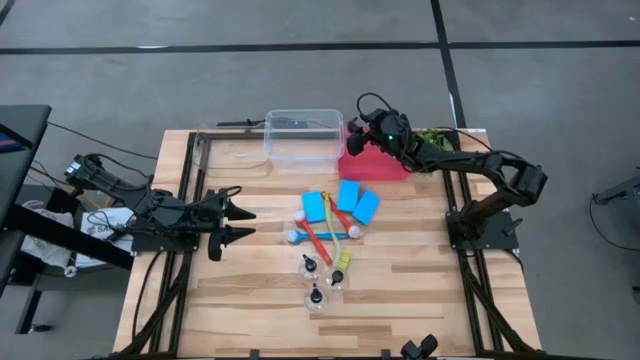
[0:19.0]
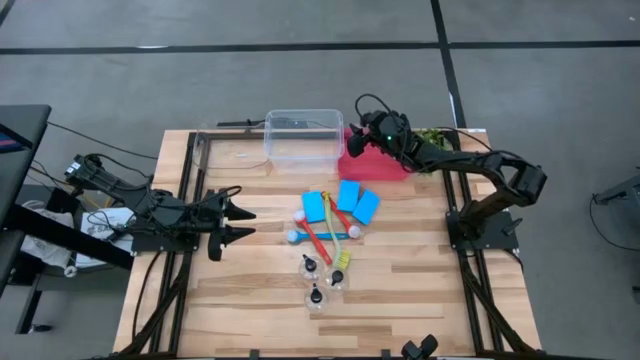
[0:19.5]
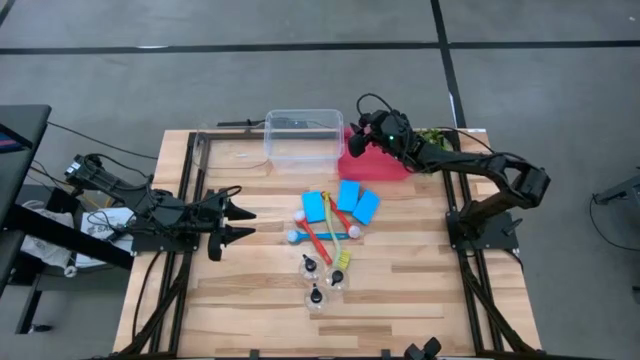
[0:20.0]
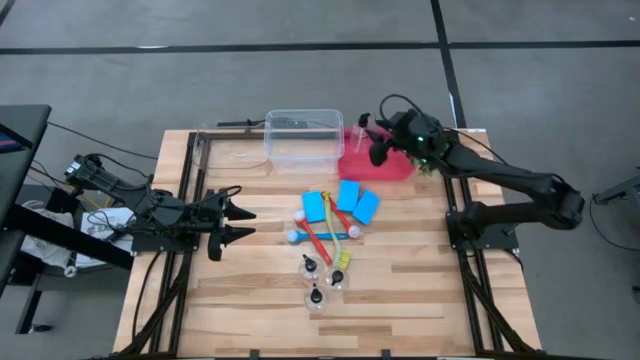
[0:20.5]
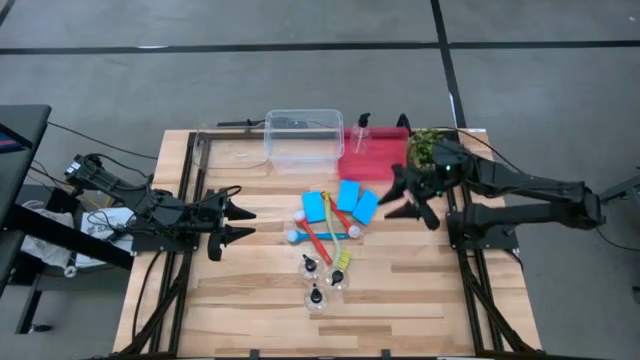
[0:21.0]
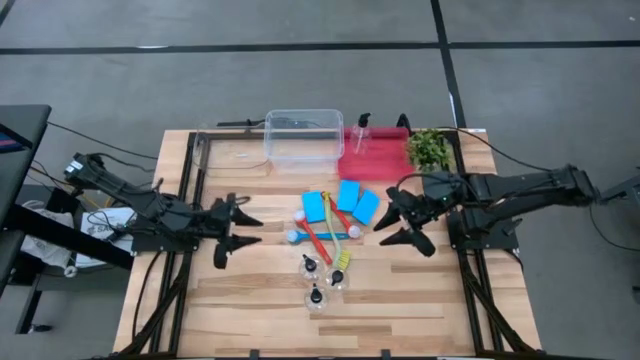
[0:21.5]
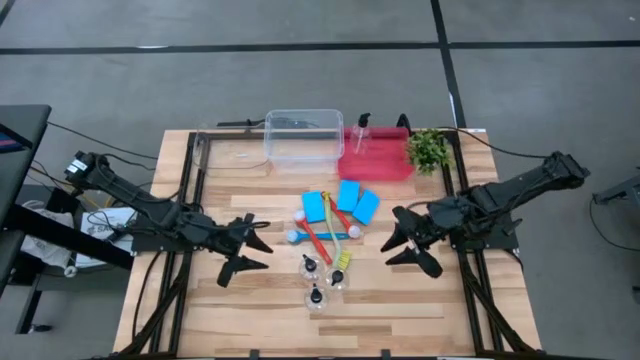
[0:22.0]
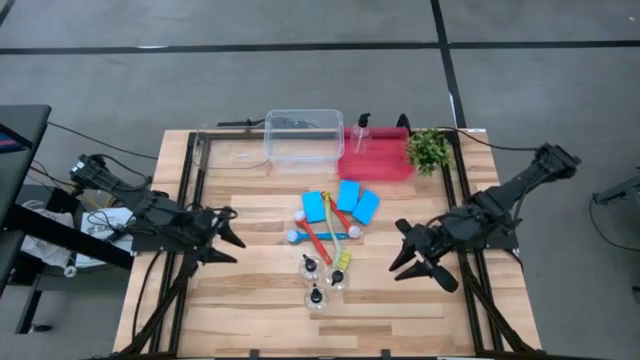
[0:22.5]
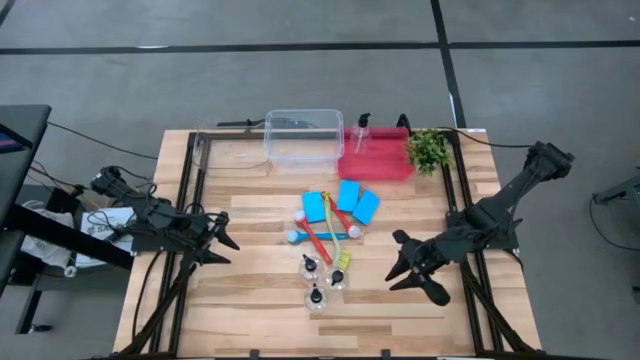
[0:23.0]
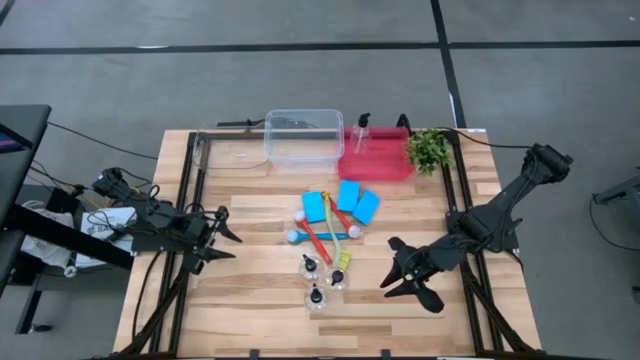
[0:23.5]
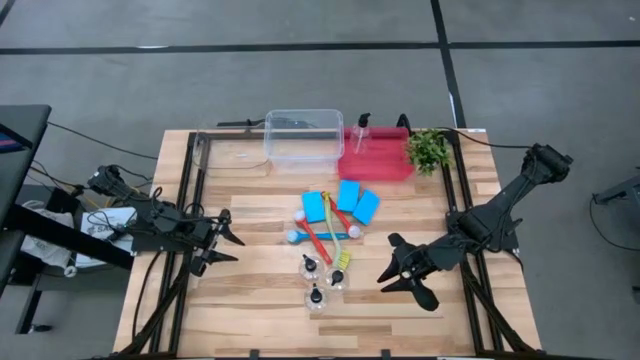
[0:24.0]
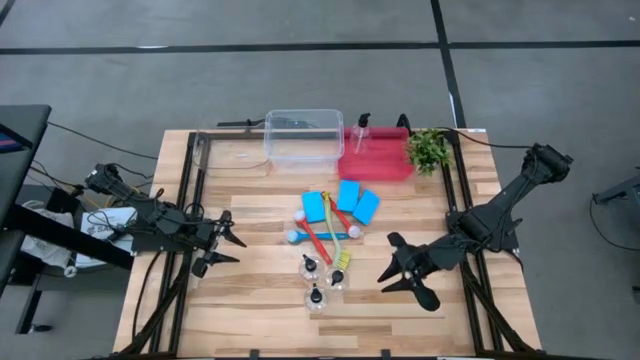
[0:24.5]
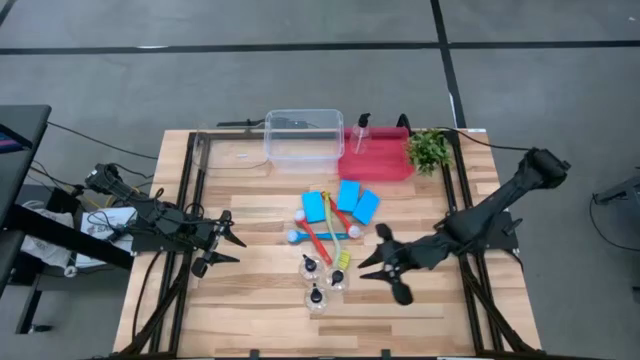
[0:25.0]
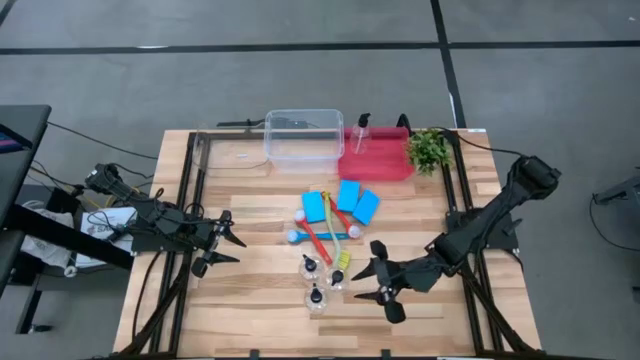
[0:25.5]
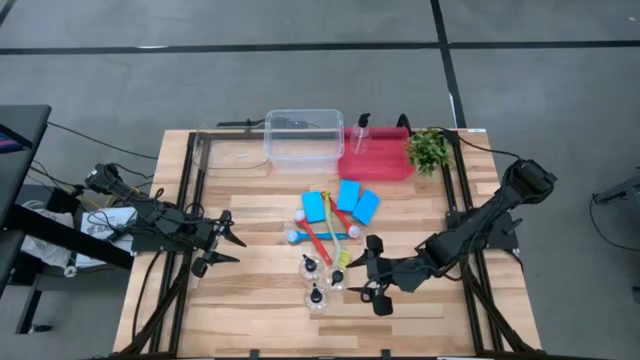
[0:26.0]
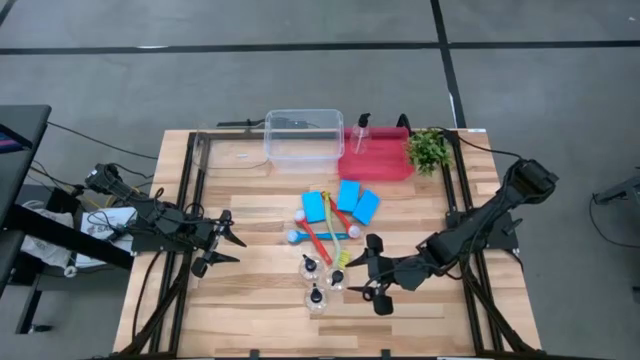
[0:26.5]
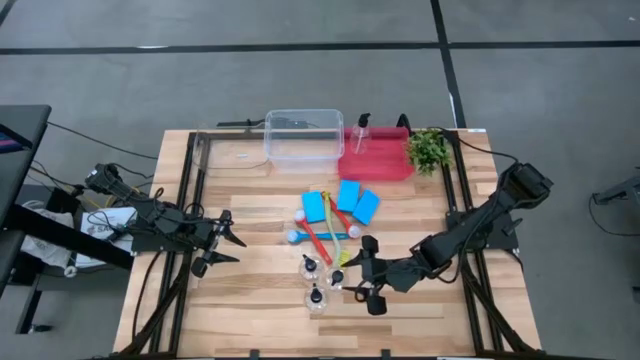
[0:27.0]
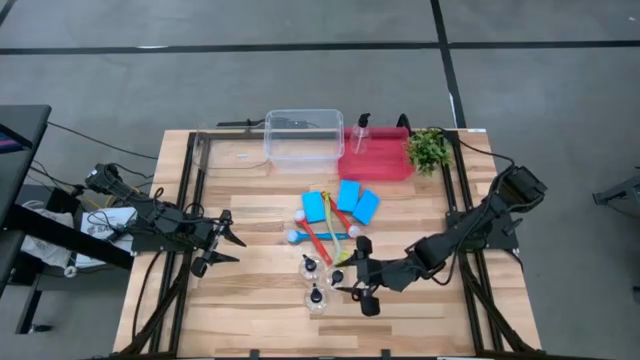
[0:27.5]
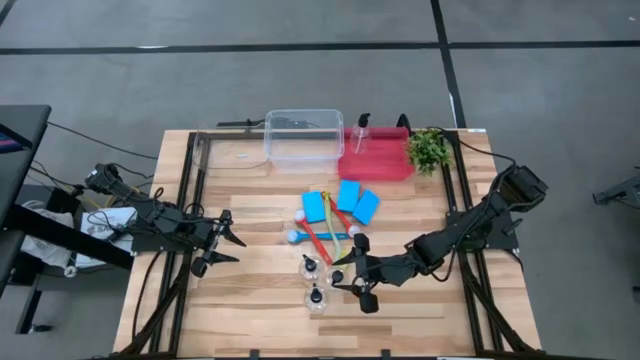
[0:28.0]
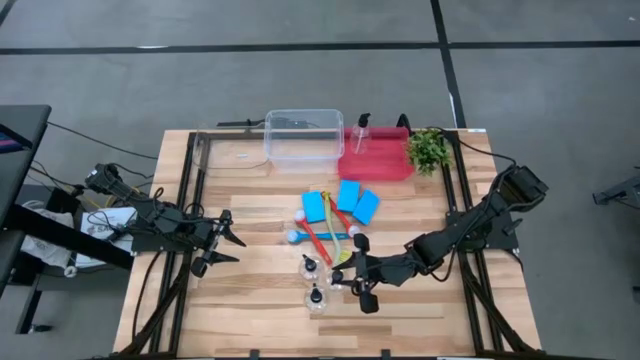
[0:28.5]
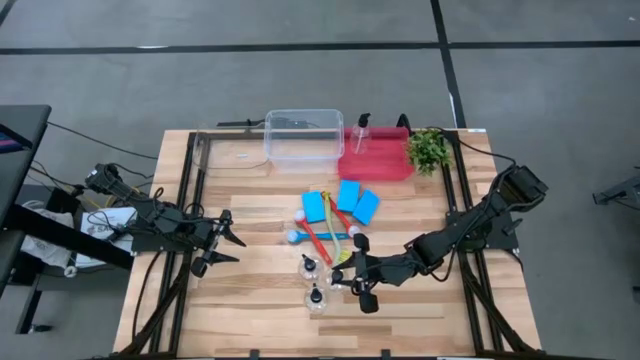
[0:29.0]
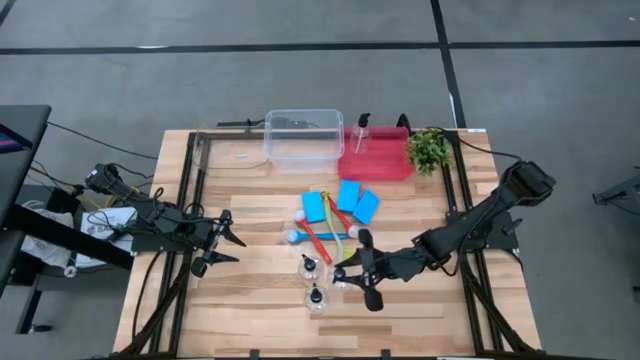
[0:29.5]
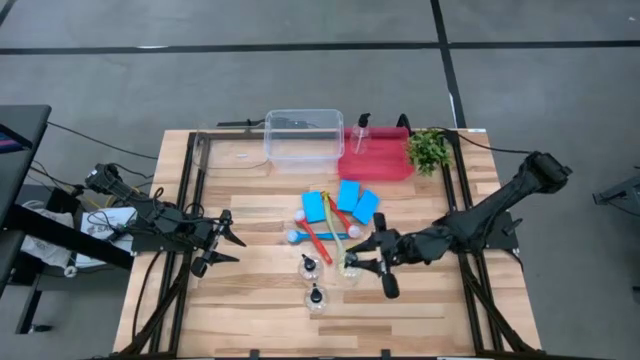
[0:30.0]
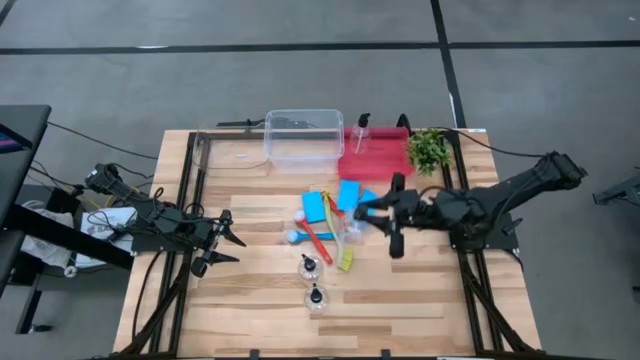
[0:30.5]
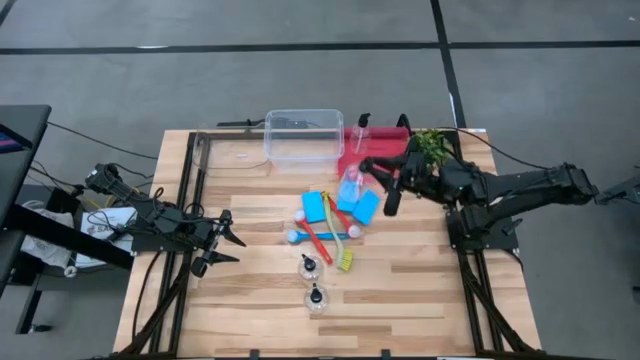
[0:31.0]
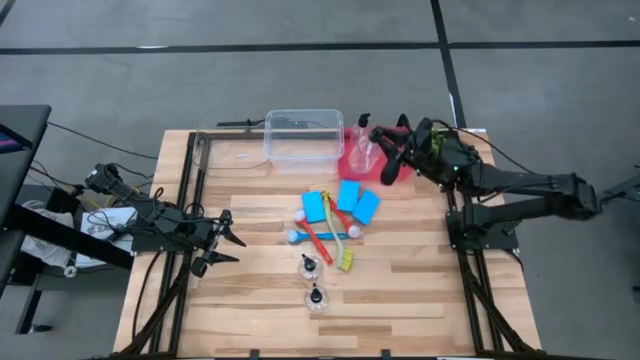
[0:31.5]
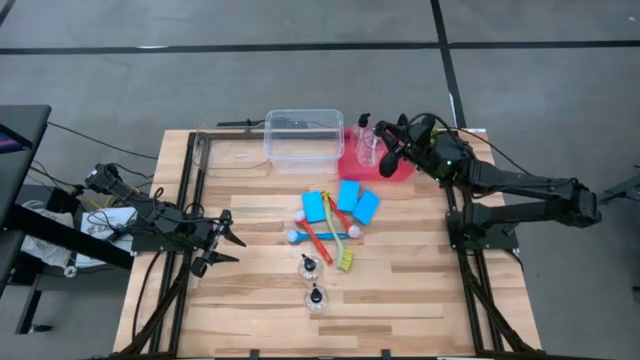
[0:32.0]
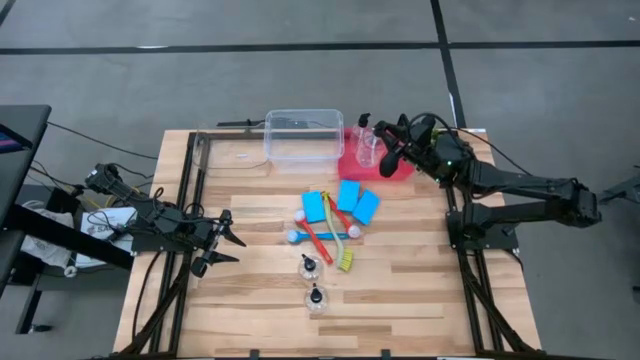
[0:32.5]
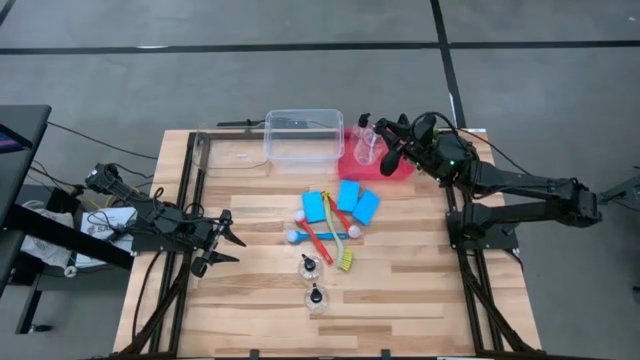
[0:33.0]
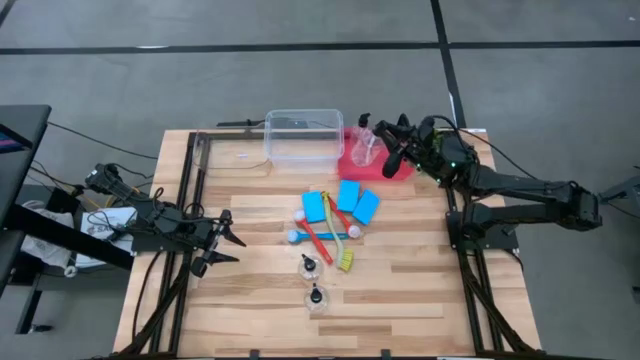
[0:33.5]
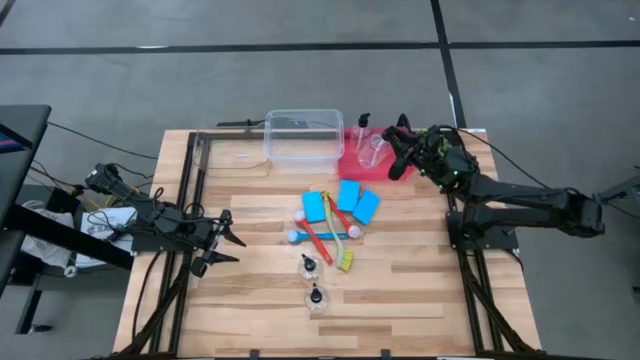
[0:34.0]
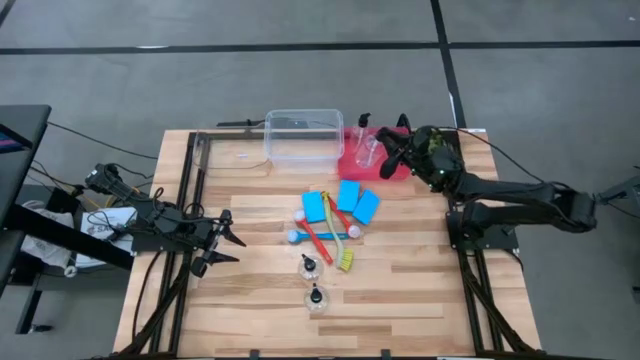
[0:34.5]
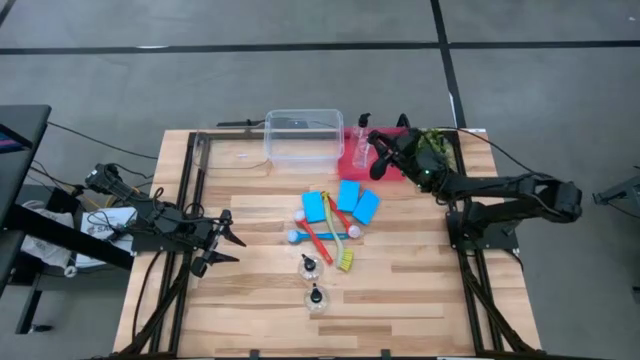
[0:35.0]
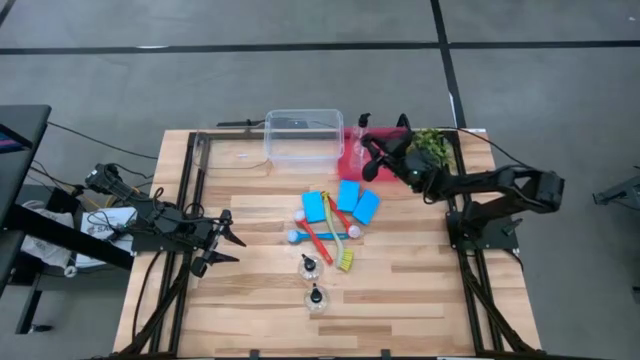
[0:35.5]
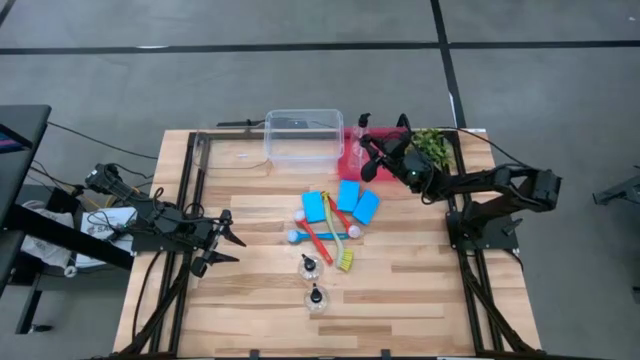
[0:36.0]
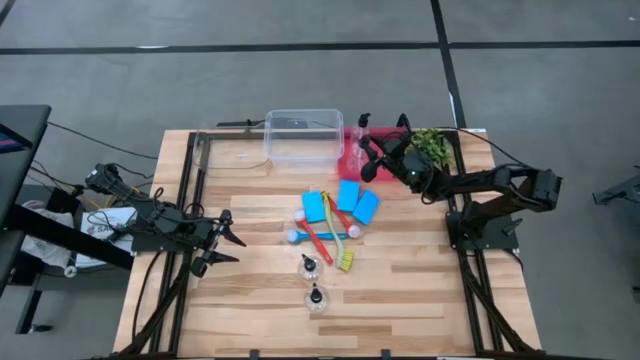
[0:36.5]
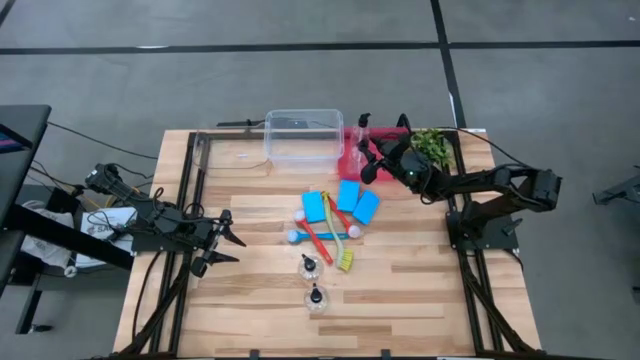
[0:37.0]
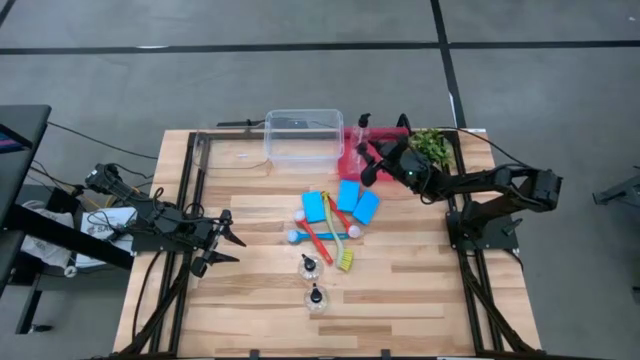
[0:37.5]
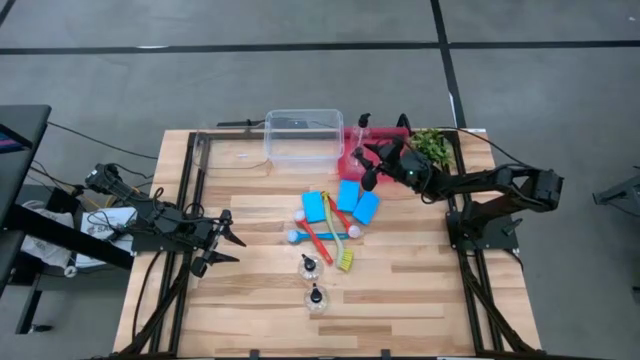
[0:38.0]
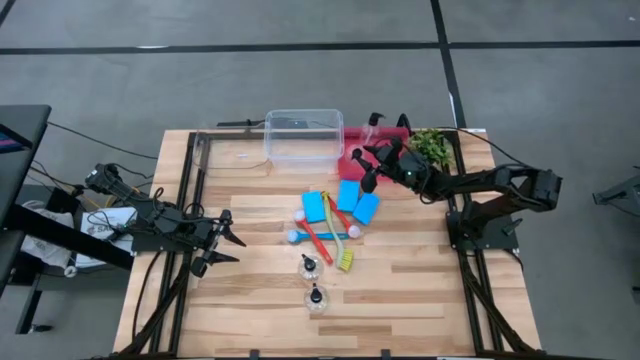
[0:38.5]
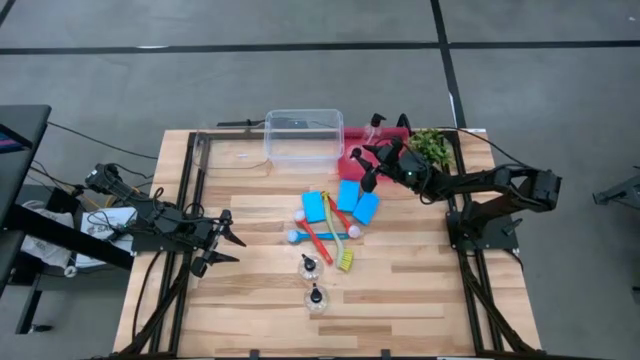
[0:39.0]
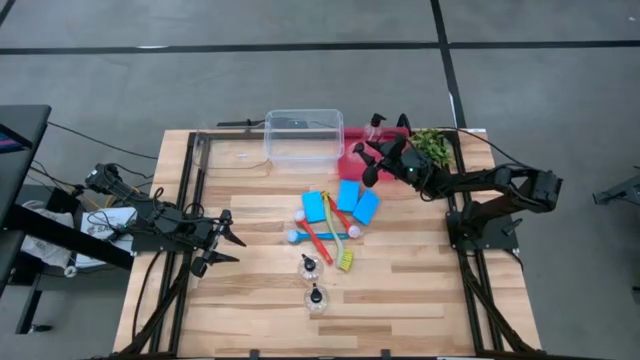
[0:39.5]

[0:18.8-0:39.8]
Task: Pick & Place Kitchen Sink Supplies
Put the transparent bottle into the red bin
